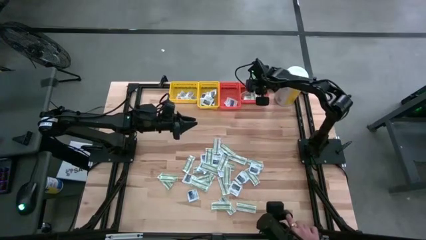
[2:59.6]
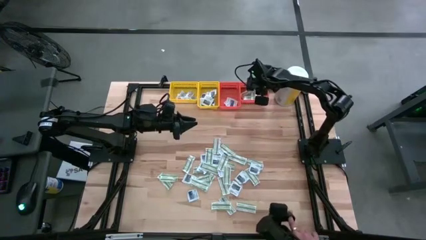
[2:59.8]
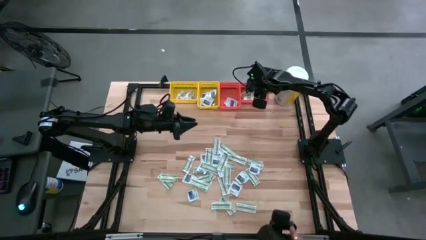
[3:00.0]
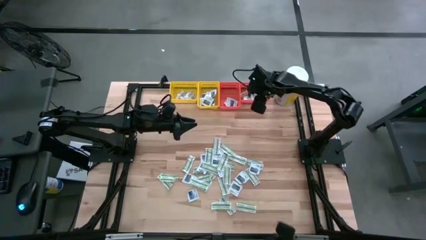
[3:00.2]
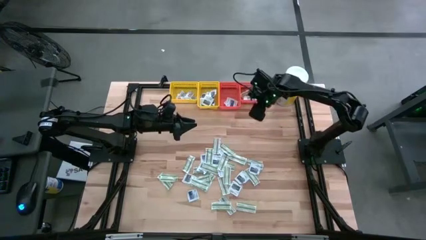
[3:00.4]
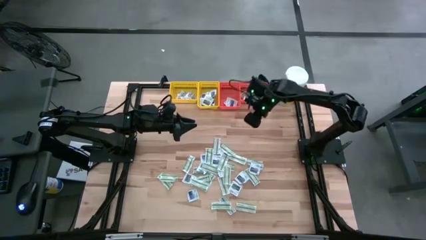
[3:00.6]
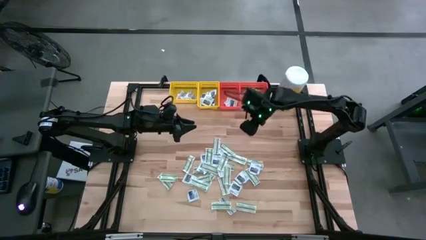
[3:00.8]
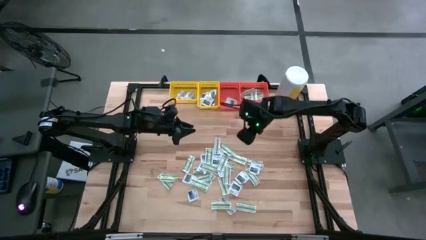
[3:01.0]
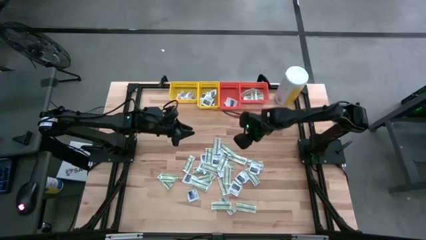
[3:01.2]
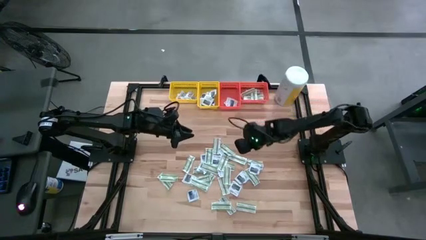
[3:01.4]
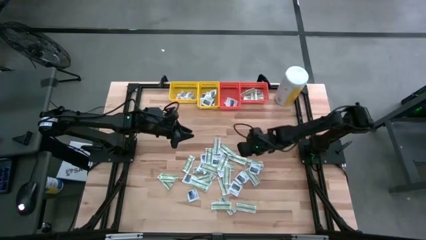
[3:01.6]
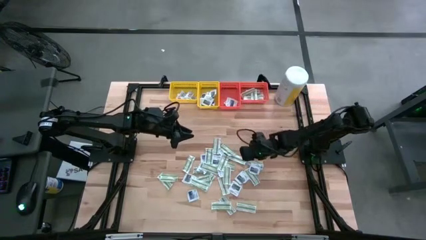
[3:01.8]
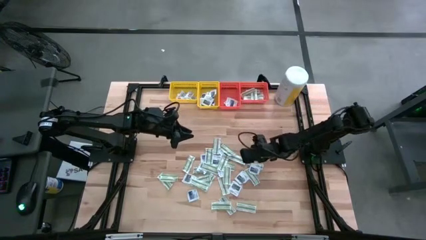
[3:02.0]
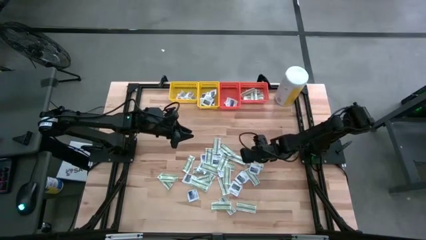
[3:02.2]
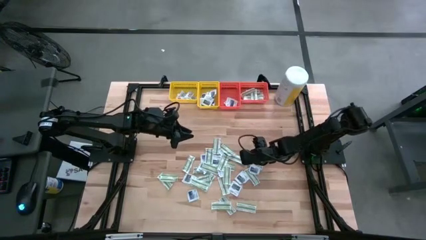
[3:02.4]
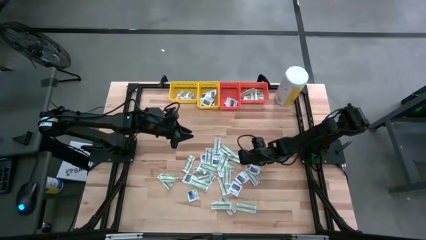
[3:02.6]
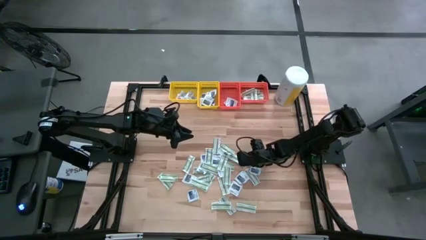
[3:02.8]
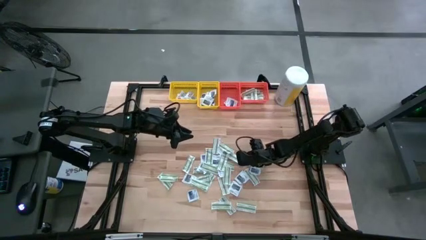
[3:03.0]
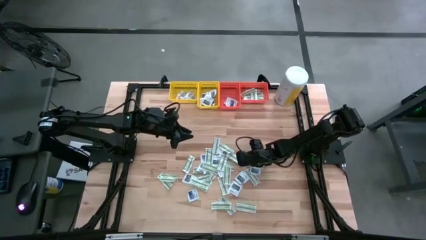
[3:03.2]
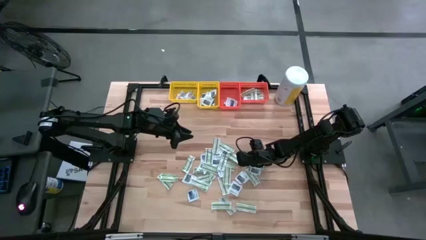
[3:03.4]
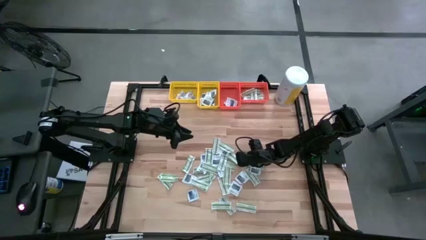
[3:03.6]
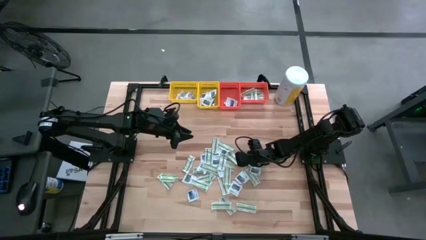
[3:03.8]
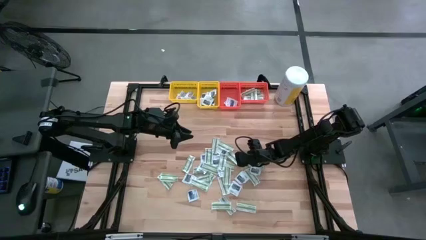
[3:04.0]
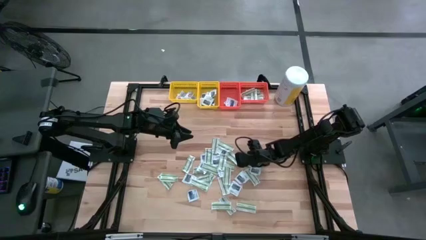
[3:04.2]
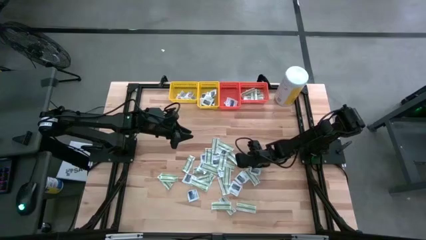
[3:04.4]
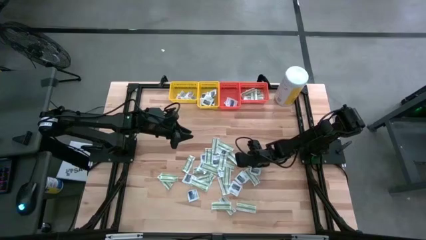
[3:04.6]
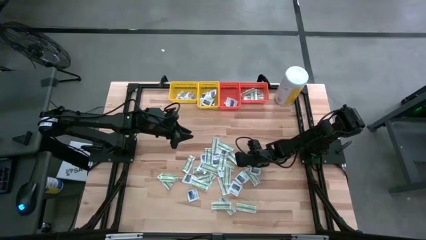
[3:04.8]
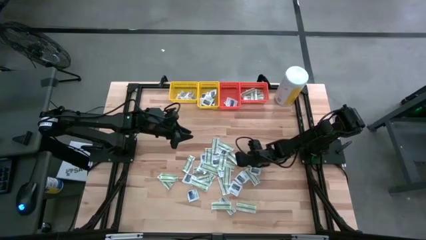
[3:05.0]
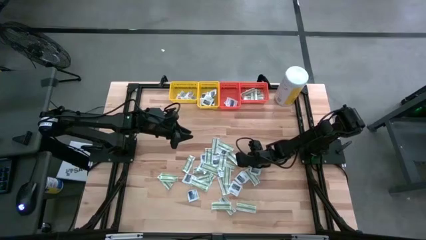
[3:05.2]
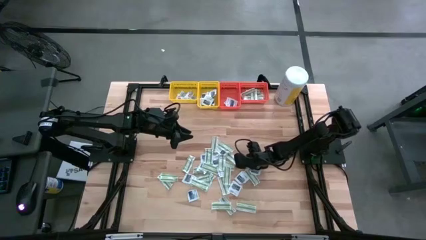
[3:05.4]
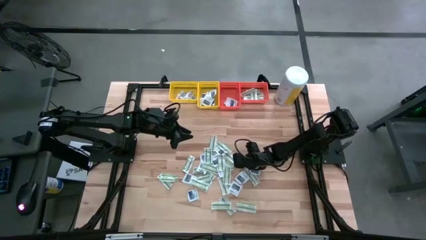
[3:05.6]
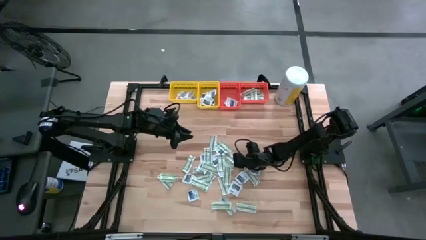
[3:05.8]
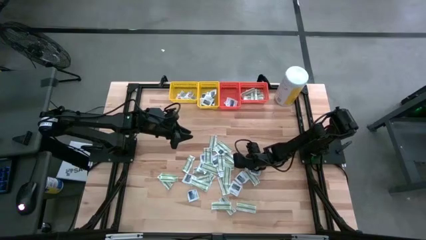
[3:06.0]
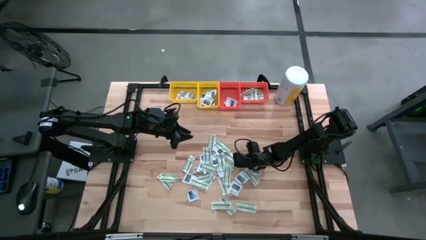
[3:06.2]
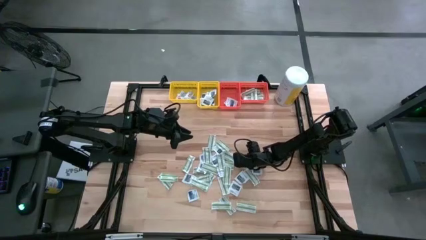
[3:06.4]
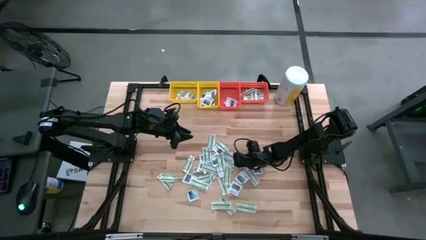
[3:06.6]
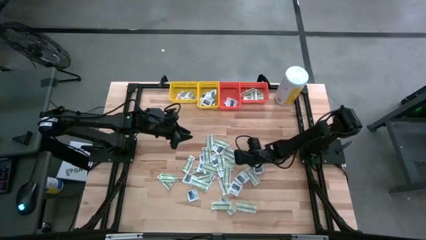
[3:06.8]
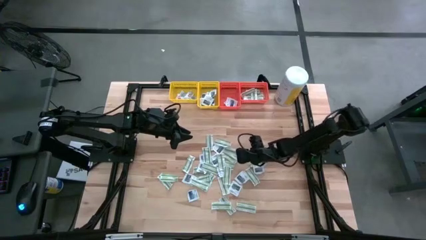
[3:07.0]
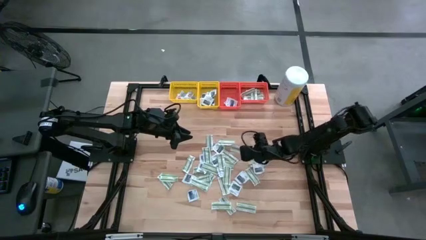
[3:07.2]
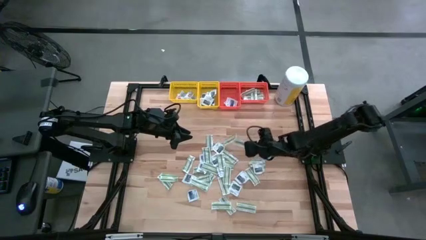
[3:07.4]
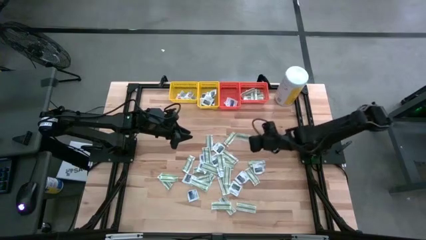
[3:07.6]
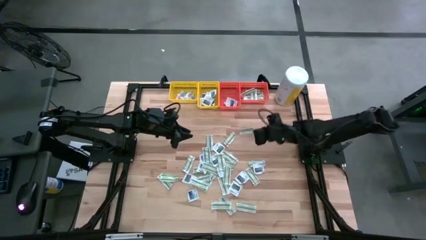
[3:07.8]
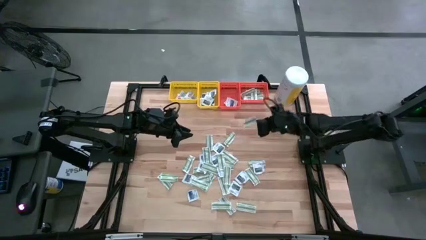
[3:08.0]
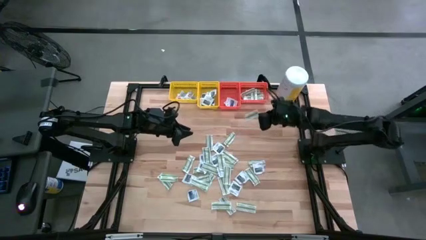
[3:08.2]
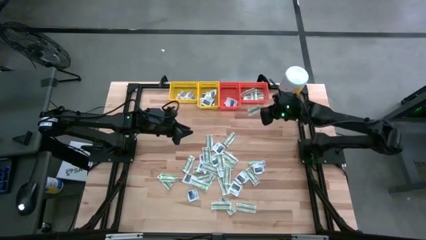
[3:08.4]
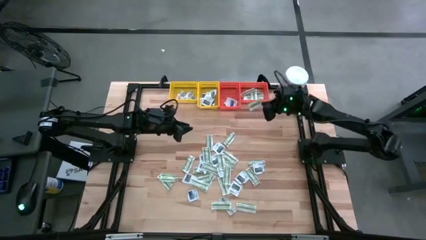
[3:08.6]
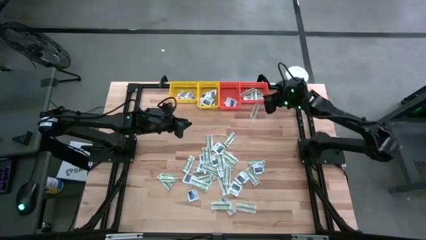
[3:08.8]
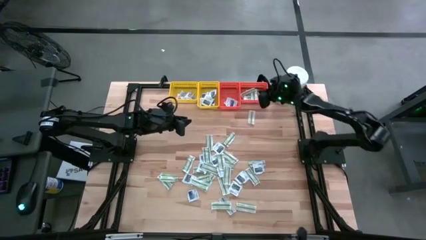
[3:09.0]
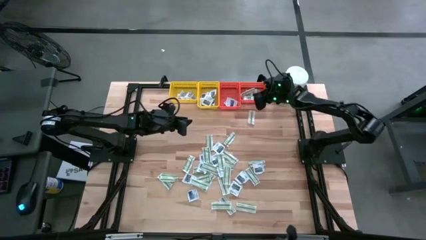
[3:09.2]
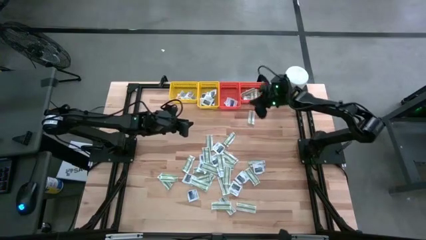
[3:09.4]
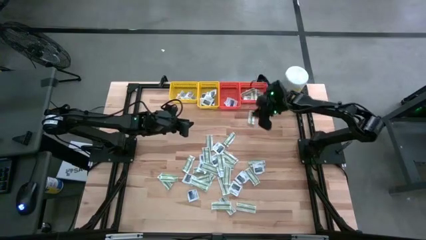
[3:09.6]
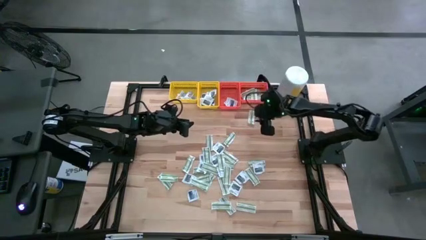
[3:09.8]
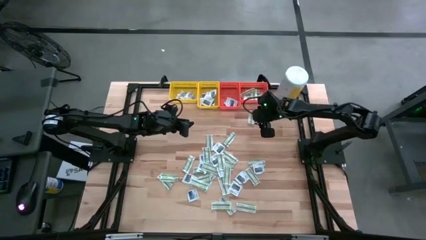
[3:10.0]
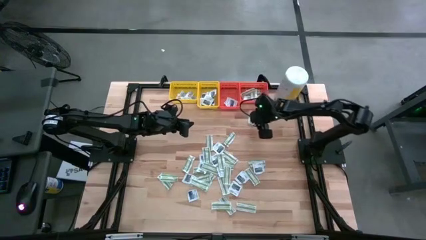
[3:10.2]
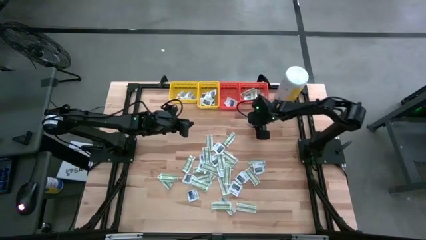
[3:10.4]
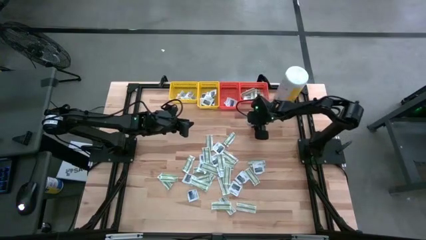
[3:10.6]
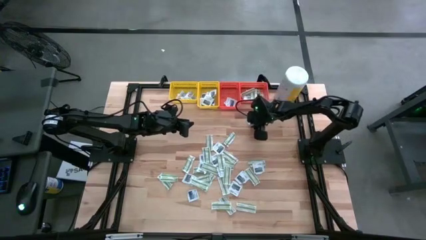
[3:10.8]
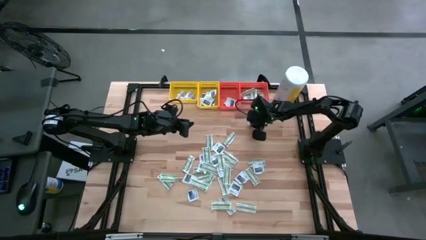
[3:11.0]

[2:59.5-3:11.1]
Task: Pick & Place First Aid Supplies
Put the green pad into the right orange bin

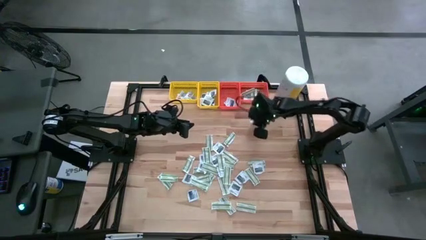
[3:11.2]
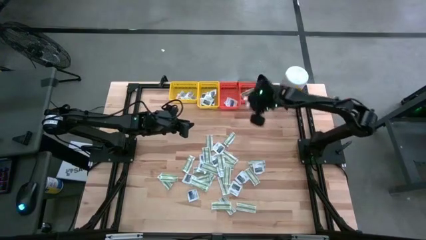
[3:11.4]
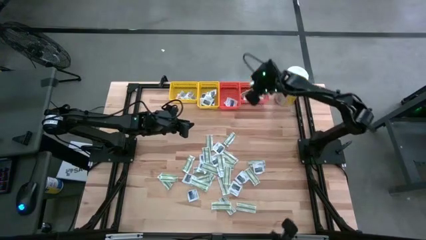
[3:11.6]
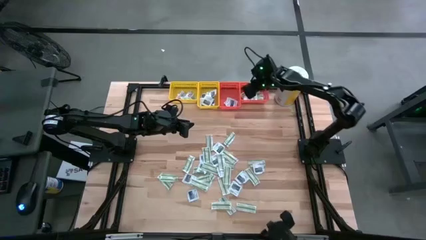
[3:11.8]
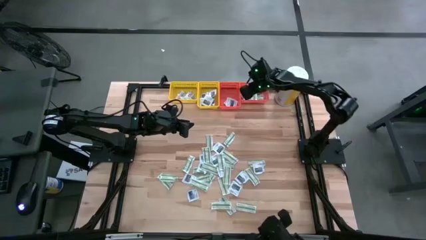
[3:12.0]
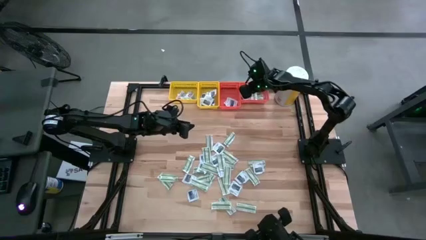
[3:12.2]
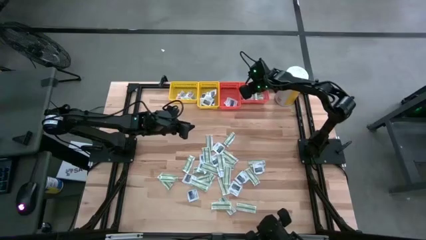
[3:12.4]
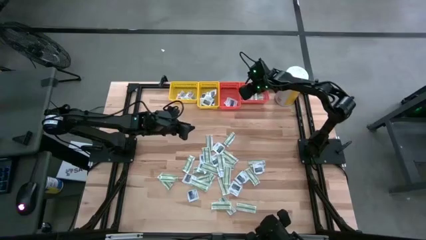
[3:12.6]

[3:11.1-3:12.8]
Put the green pad into the right orange bin

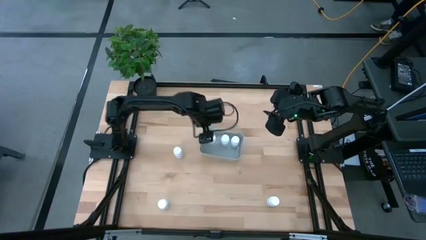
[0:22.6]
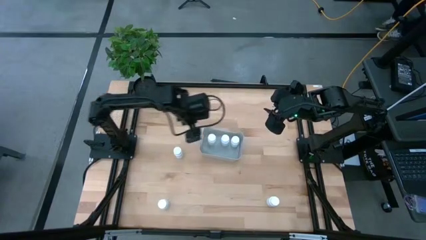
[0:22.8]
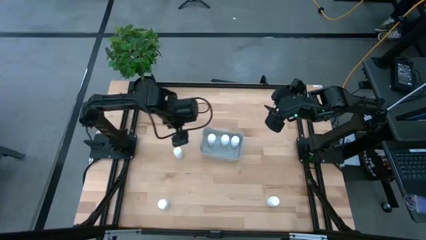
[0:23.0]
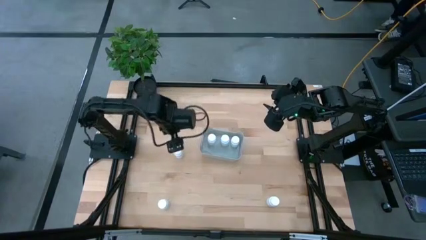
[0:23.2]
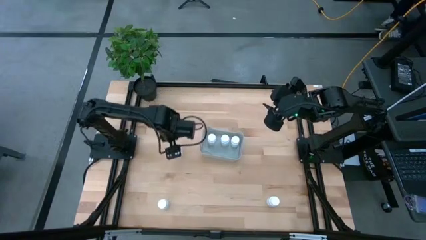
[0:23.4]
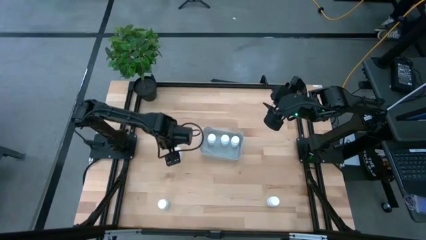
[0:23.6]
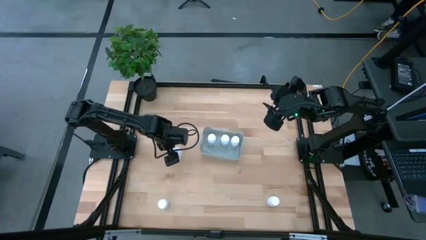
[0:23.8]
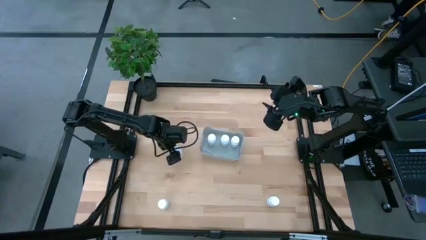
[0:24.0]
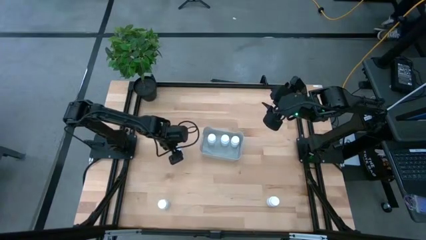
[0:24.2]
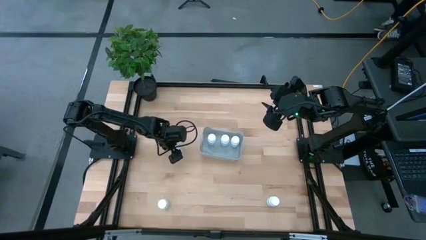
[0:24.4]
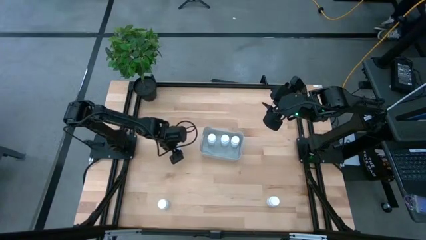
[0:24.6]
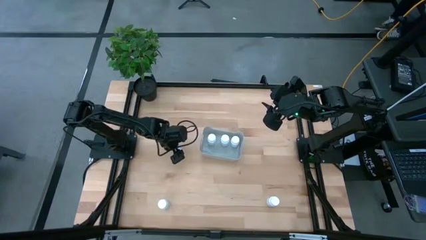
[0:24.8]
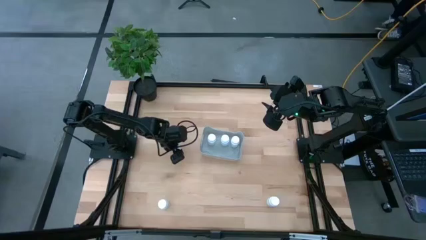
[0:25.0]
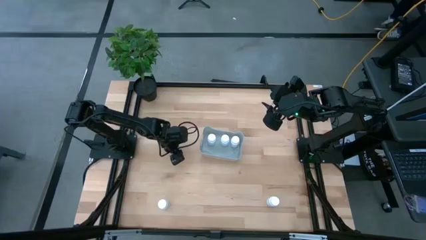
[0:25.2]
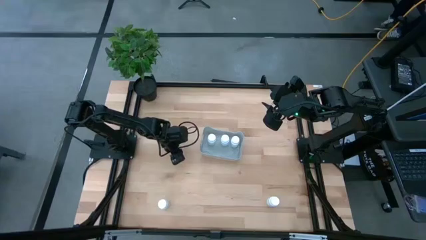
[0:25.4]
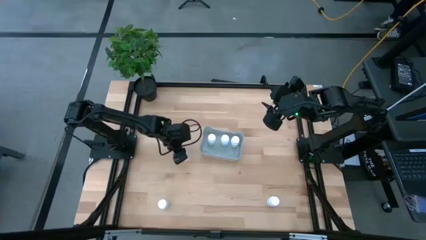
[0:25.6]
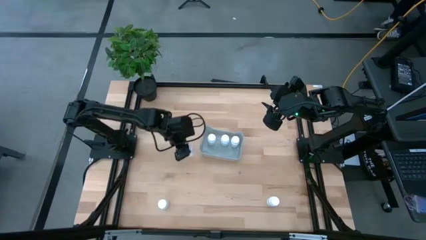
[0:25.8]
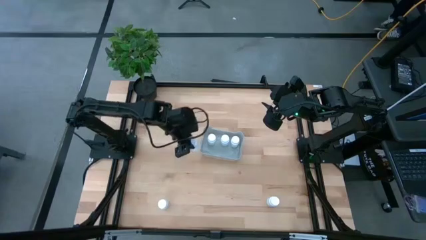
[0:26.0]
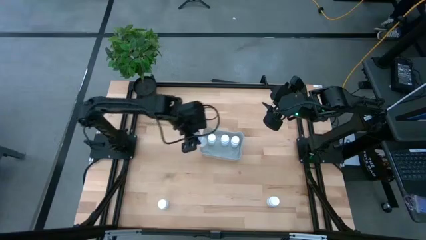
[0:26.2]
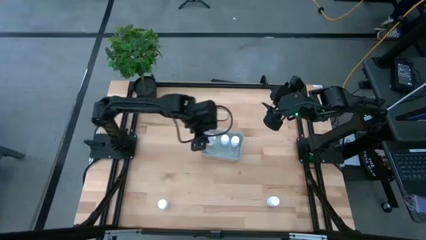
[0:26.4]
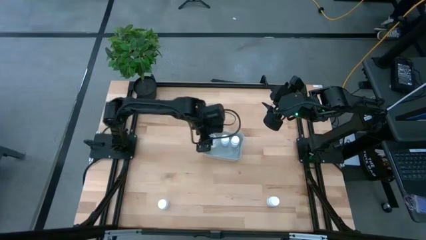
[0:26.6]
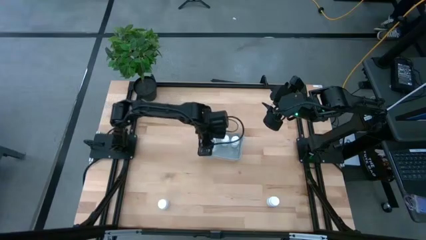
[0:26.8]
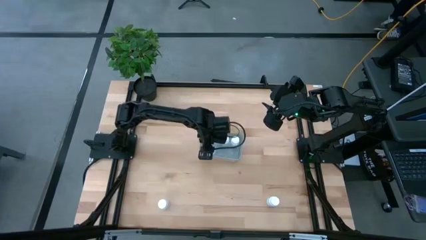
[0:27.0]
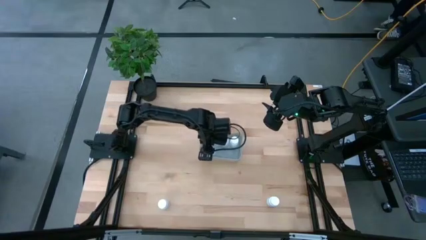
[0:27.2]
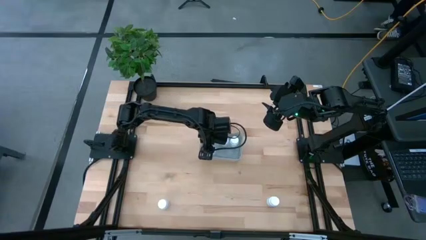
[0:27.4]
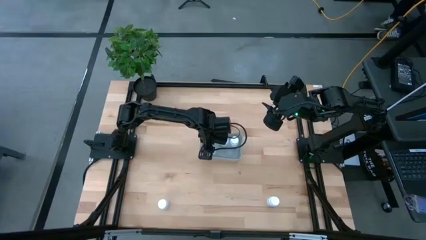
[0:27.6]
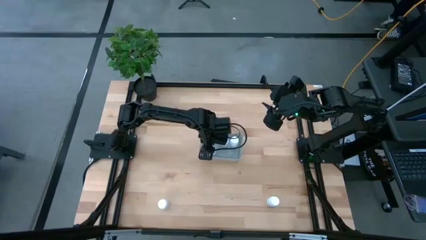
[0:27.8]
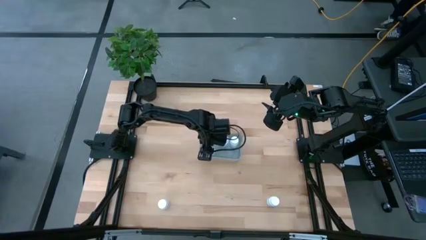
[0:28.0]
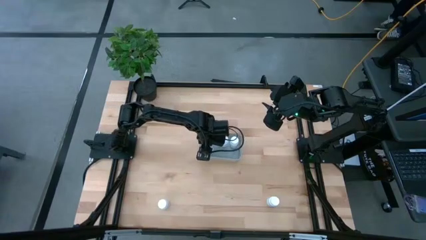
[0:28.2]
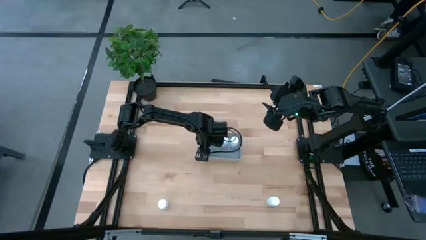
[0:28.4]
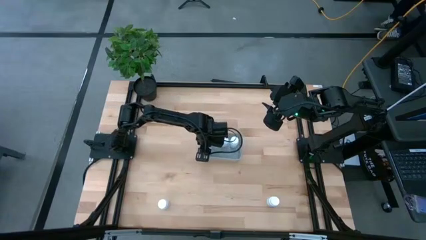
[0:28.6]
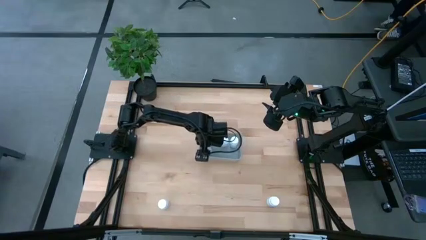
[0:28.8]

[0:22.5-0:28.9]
Task: Pick and place pill bottles into a basket
Put the top white pill bottle into the gray bin
